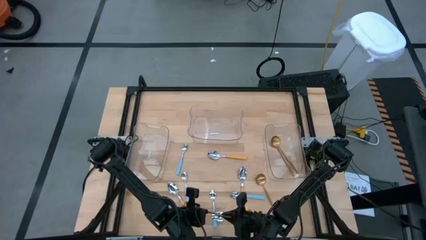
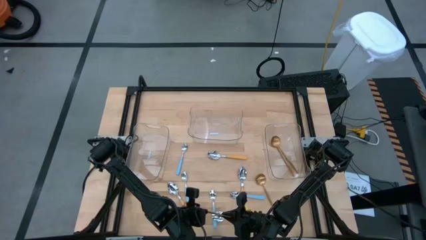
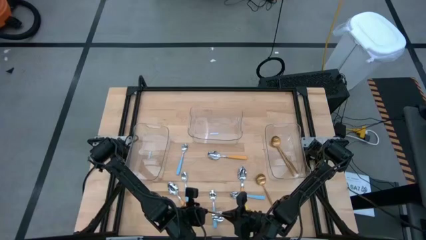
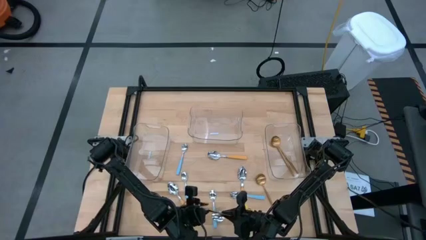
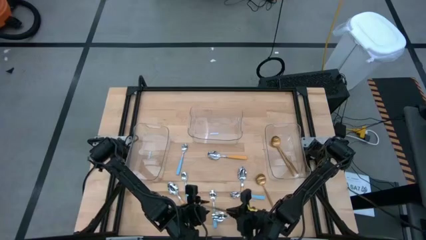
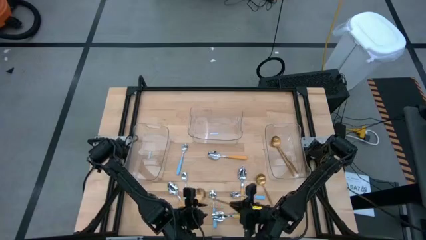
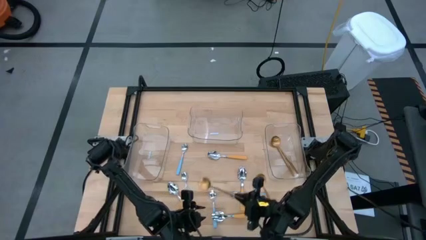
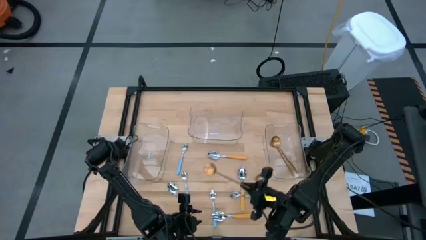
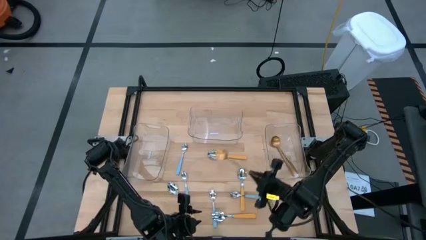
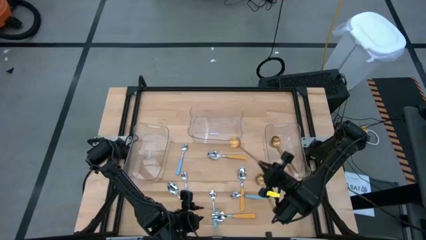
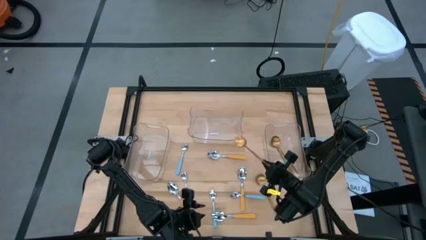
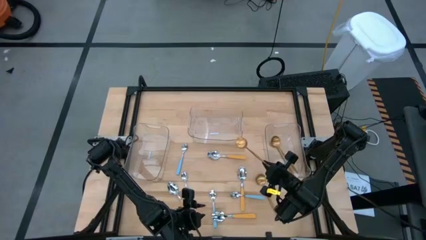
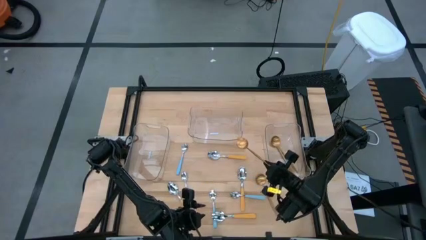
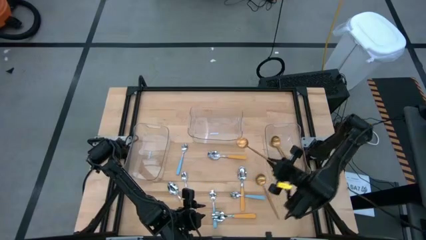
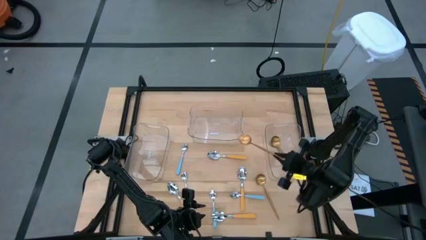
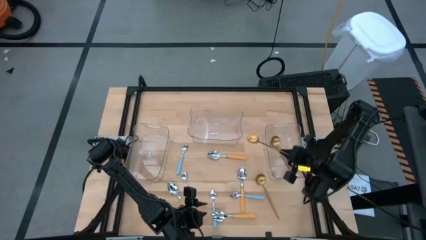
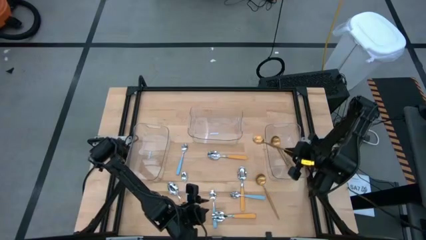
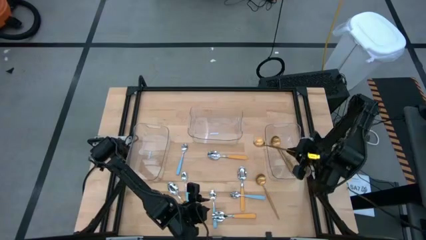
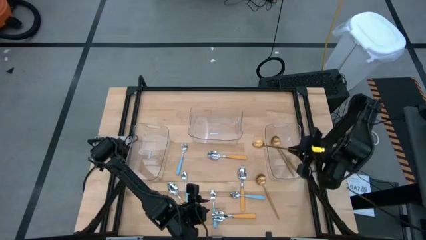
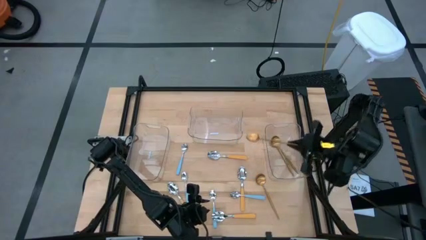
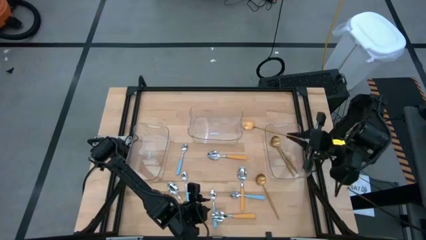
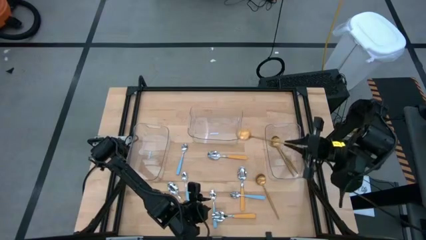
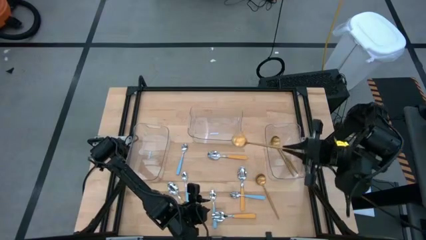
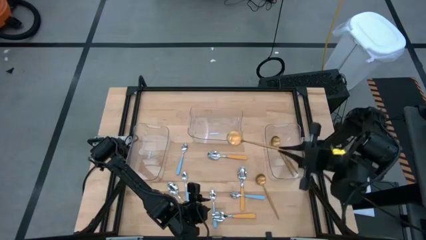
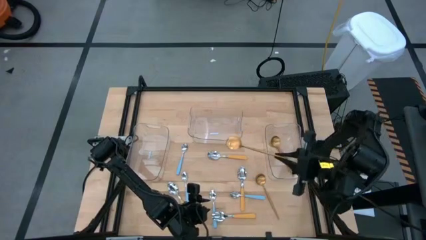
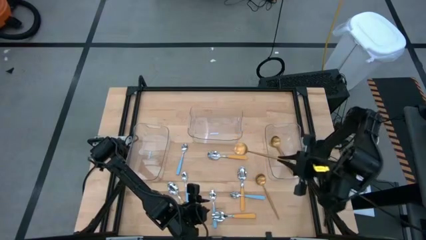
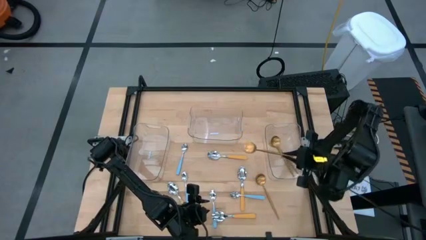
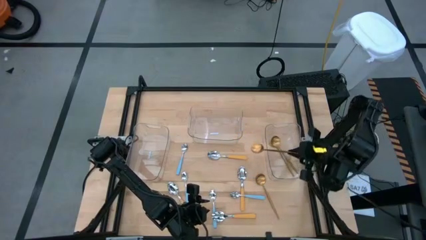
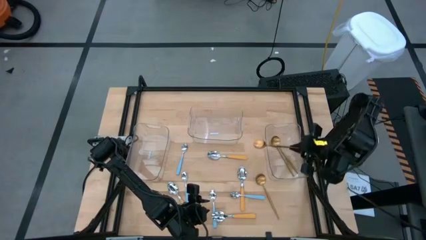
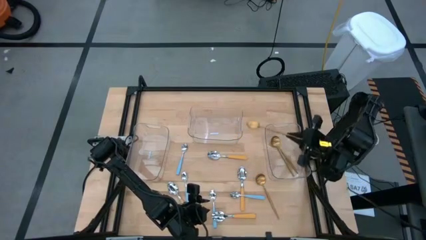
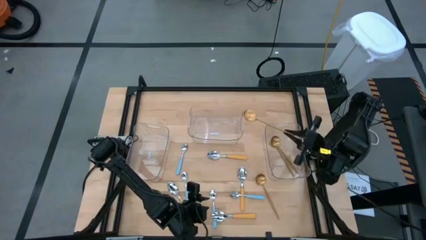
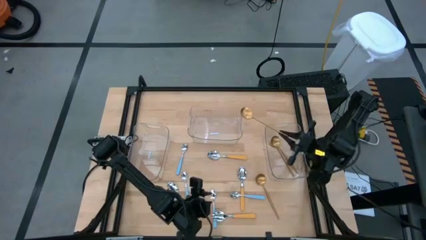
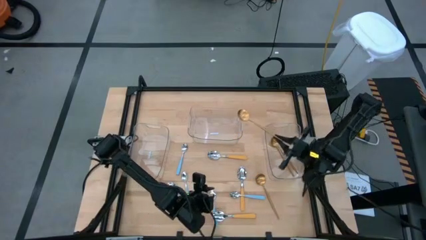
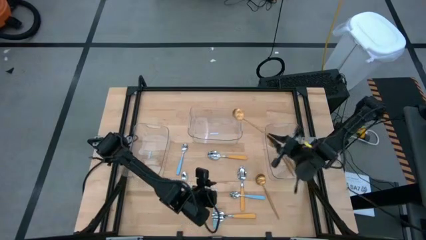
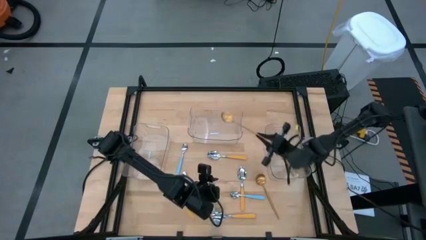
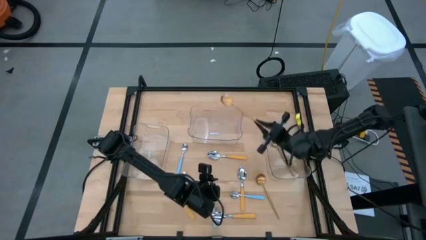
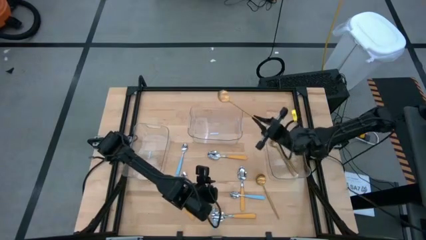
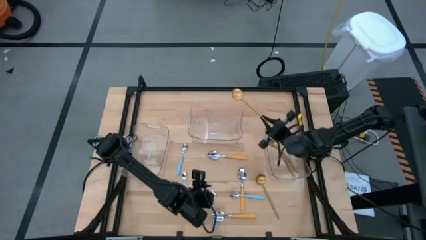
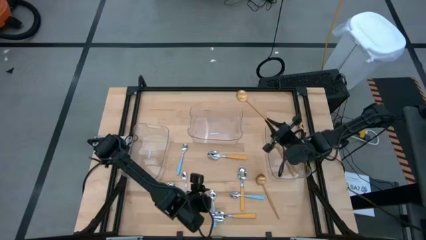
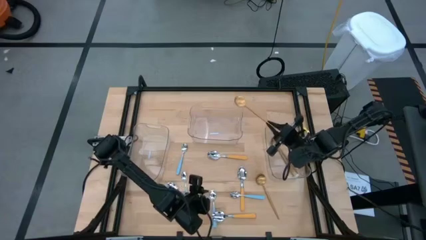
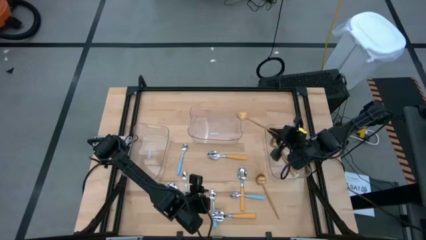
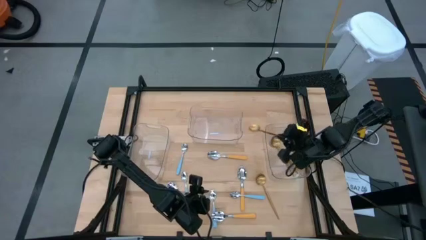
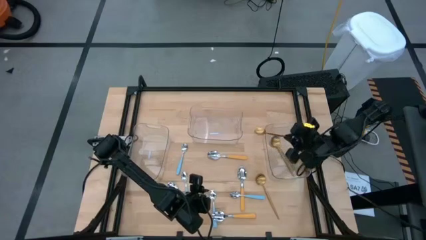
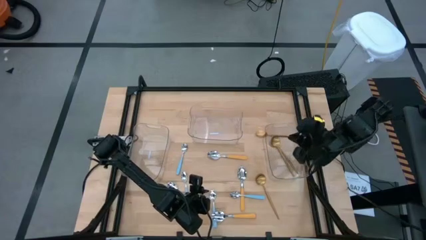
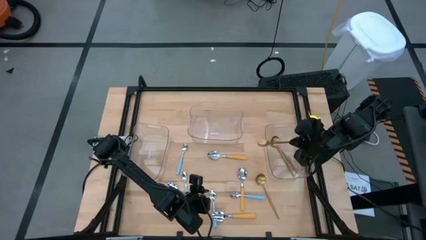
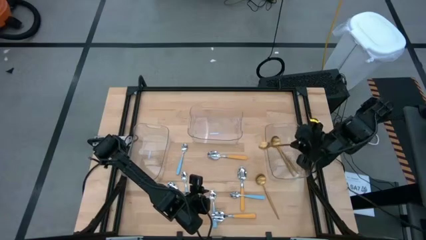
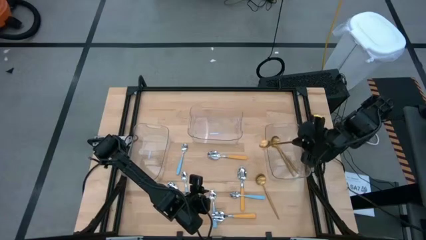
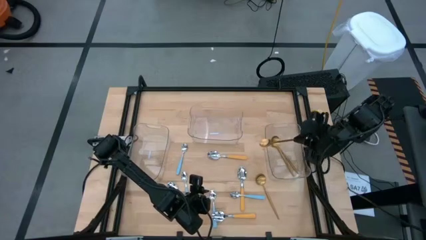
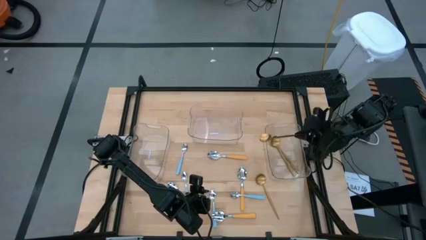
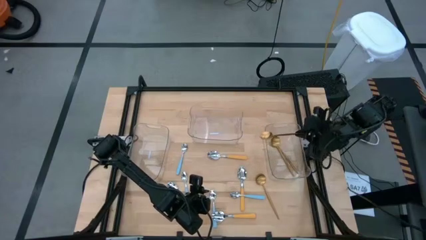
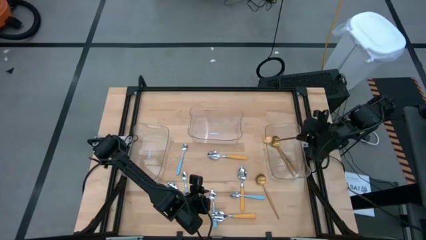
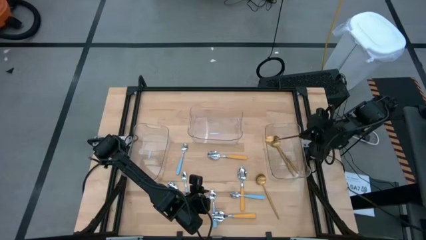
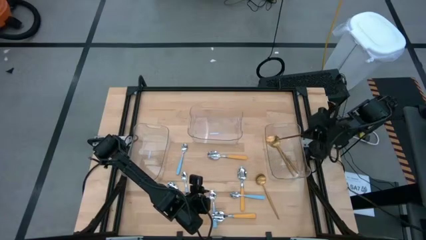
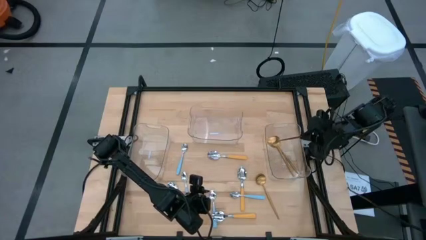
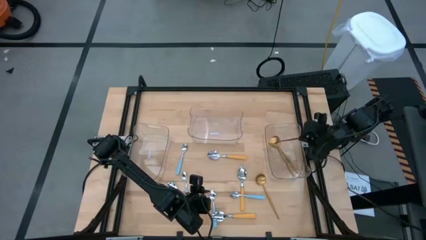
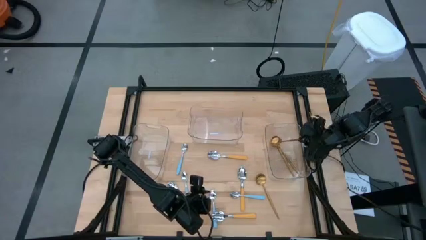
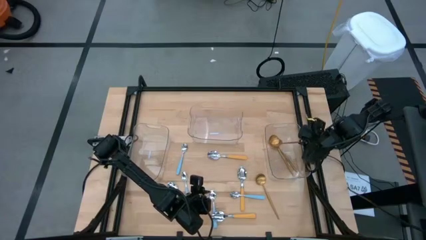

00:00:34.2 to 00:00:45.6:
Task: Sort silverware by color (type)
Put the gold spoon into the right transparent bin

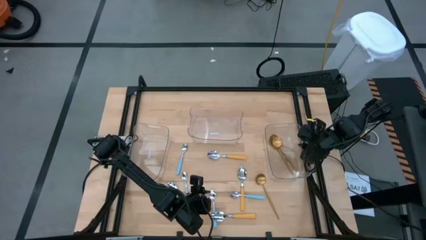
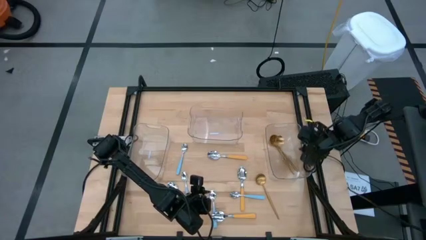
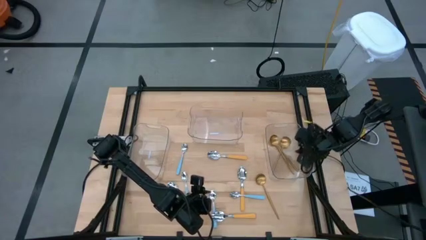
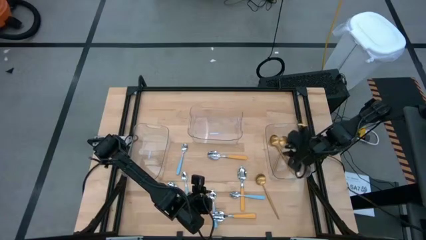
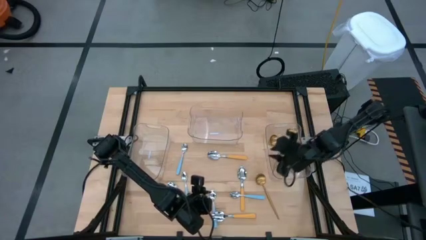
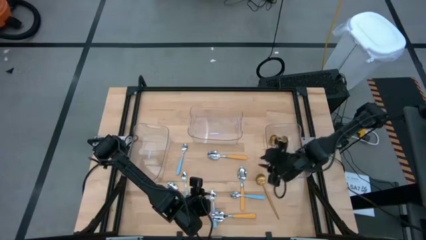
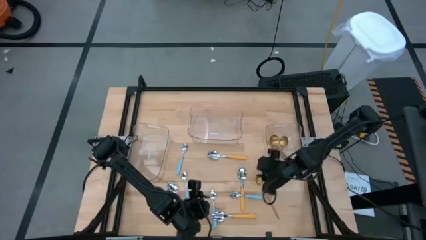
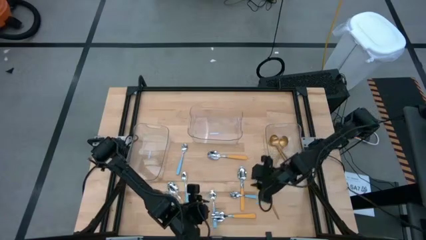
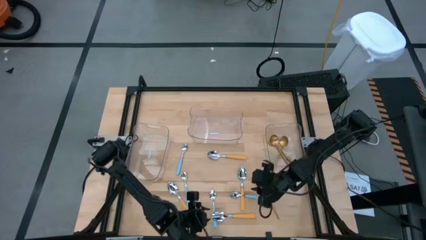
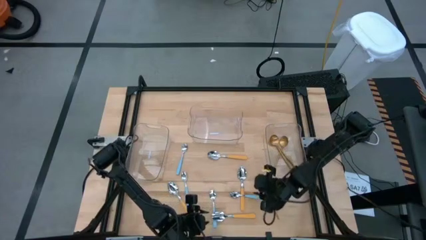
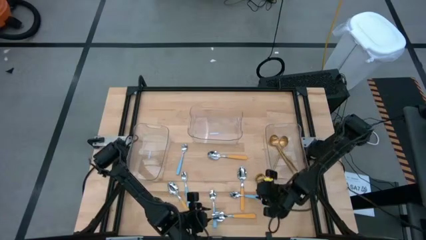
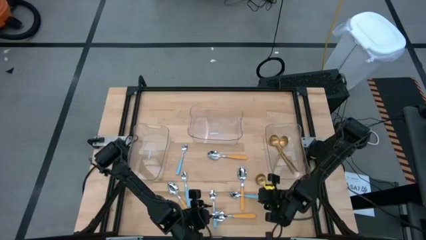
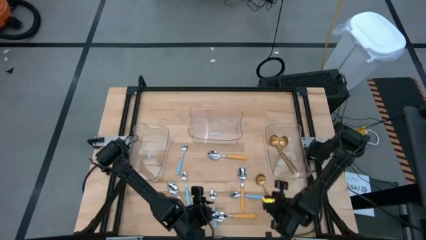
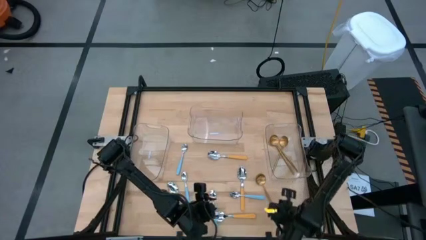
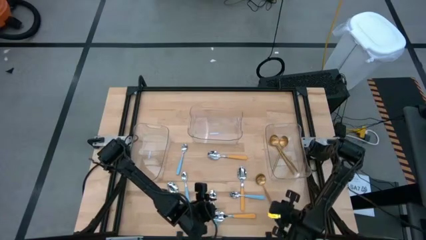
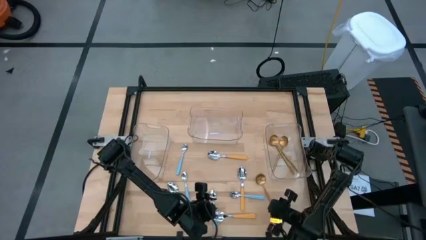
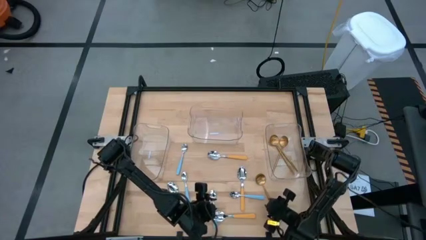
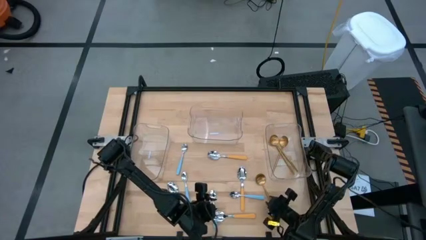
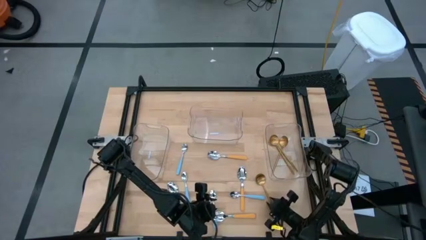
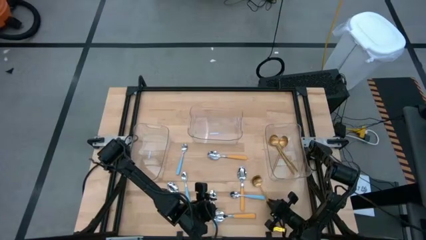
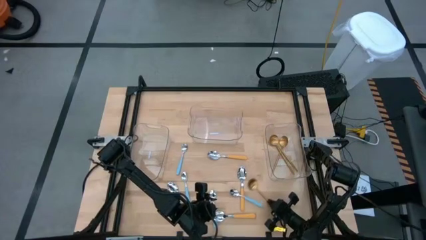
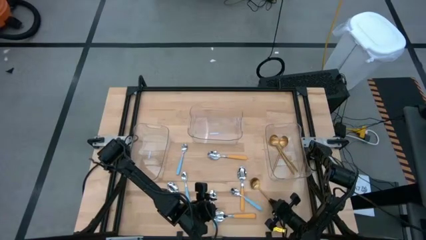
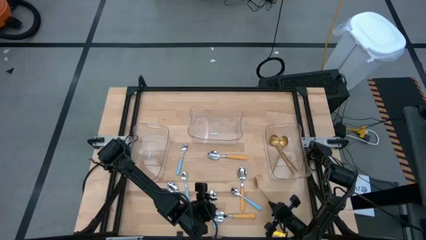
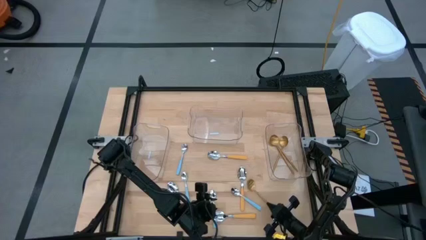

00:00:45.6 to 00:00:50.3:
Put the gold spoon into the right transparent bin
